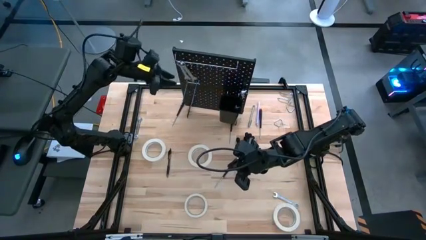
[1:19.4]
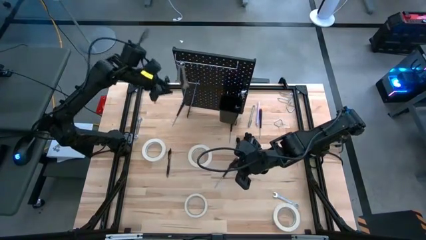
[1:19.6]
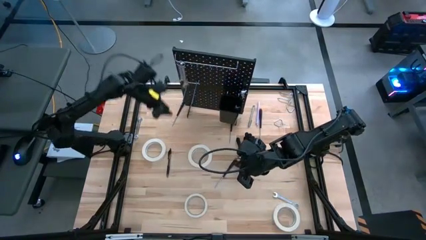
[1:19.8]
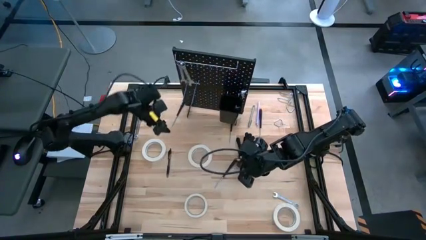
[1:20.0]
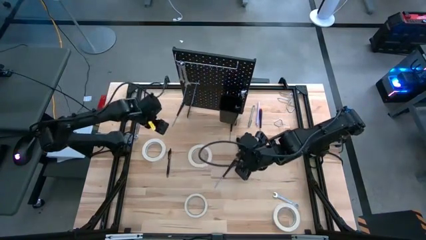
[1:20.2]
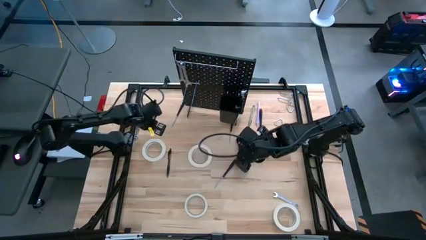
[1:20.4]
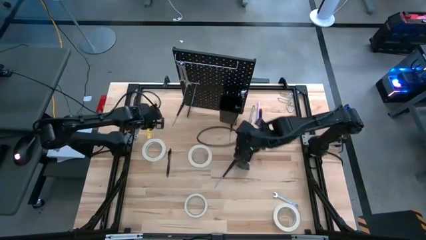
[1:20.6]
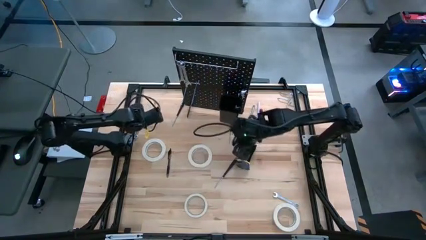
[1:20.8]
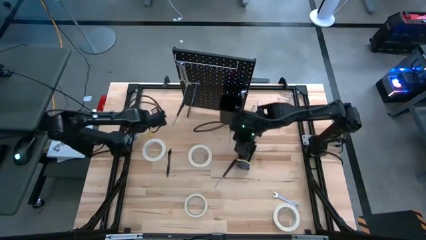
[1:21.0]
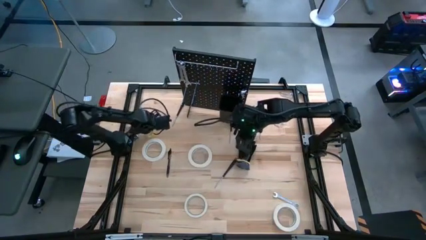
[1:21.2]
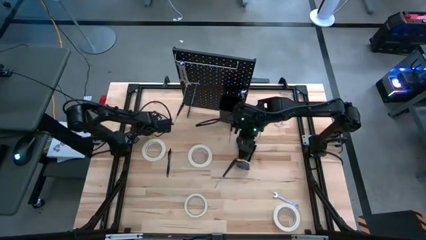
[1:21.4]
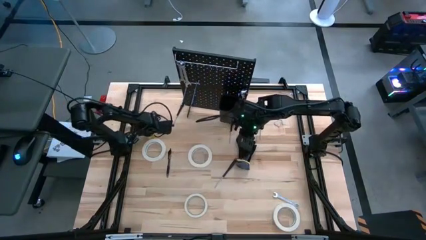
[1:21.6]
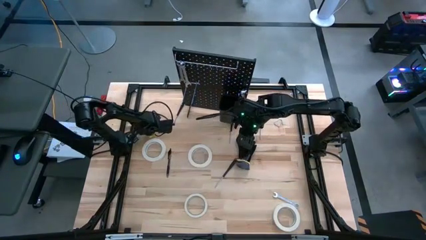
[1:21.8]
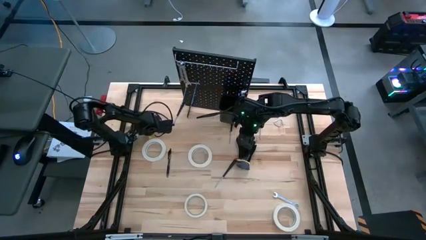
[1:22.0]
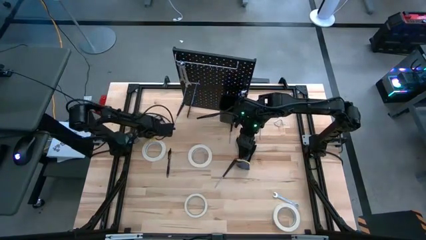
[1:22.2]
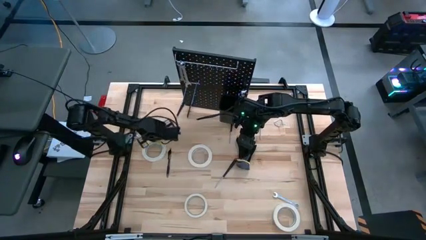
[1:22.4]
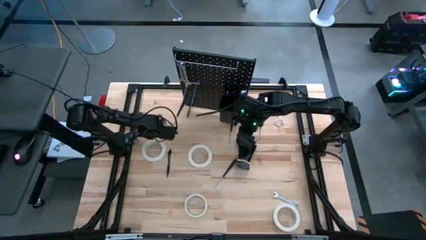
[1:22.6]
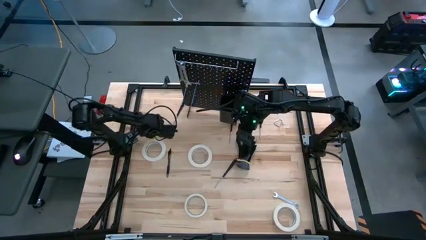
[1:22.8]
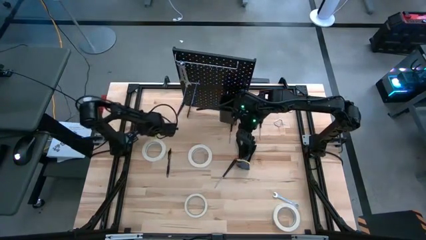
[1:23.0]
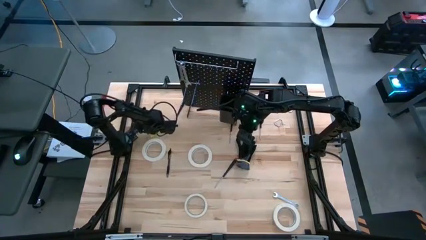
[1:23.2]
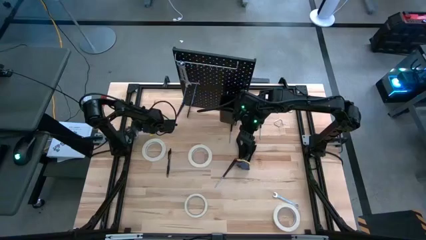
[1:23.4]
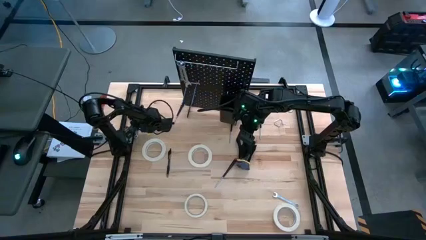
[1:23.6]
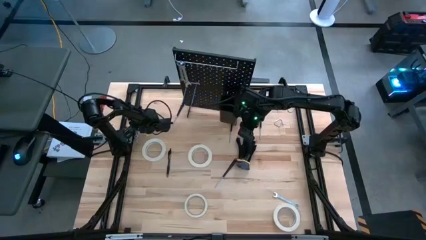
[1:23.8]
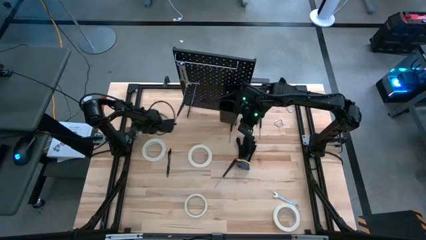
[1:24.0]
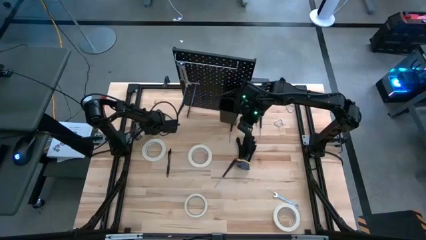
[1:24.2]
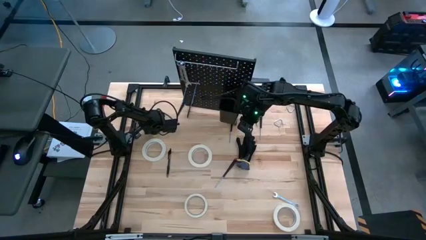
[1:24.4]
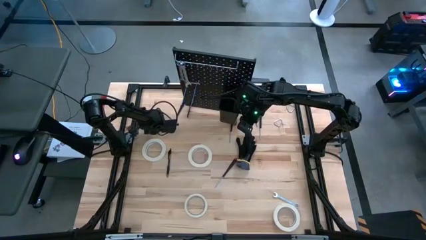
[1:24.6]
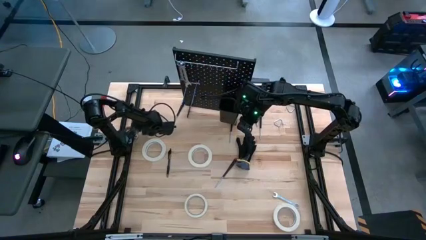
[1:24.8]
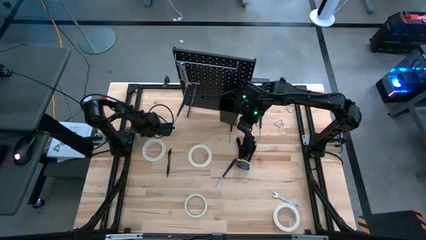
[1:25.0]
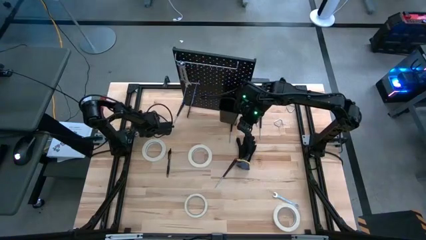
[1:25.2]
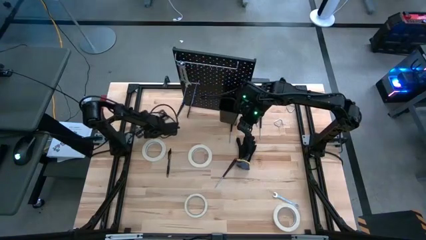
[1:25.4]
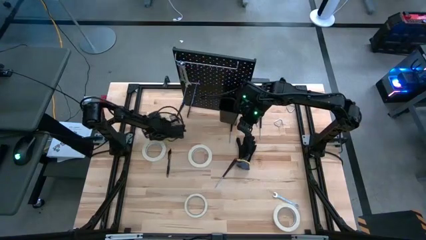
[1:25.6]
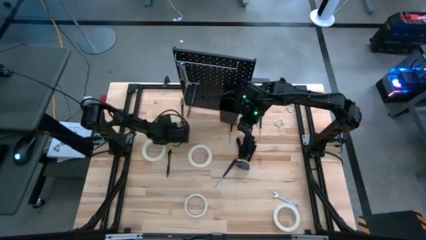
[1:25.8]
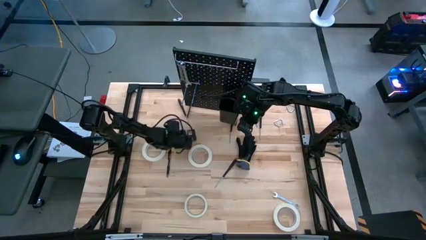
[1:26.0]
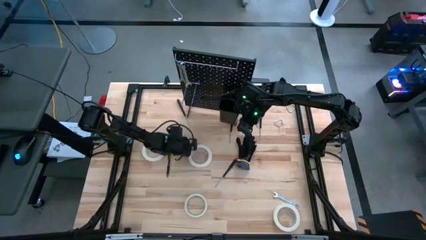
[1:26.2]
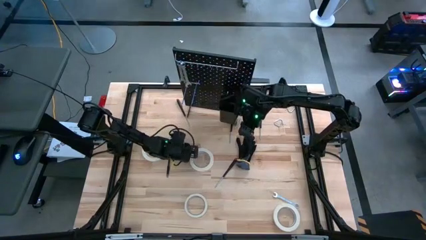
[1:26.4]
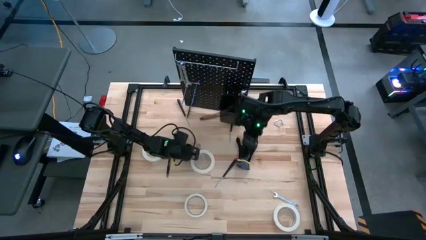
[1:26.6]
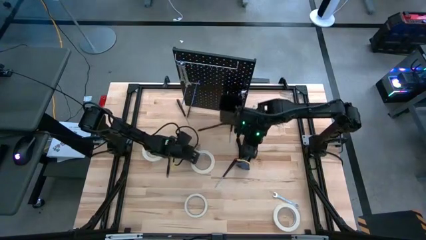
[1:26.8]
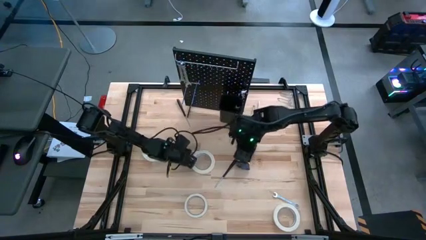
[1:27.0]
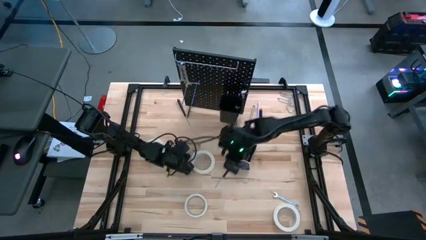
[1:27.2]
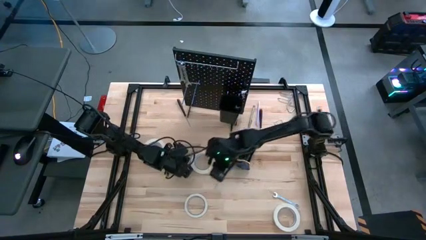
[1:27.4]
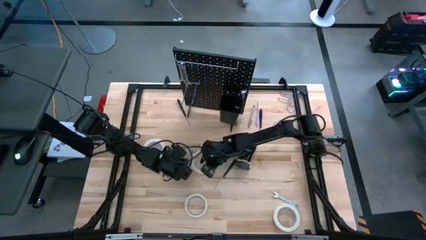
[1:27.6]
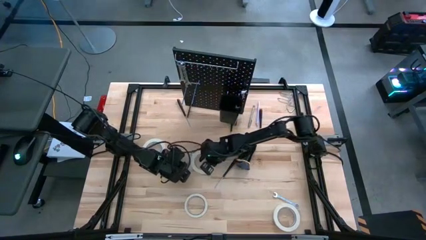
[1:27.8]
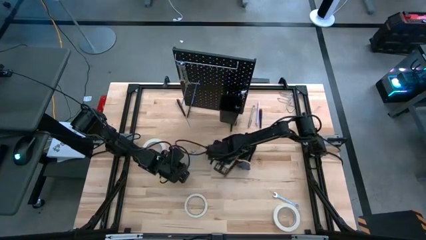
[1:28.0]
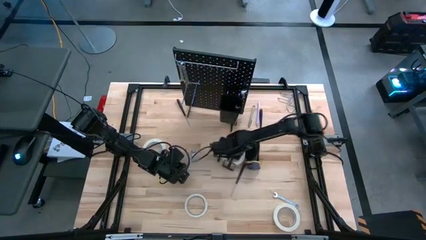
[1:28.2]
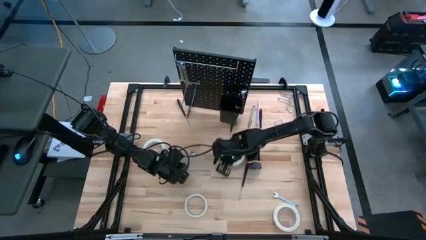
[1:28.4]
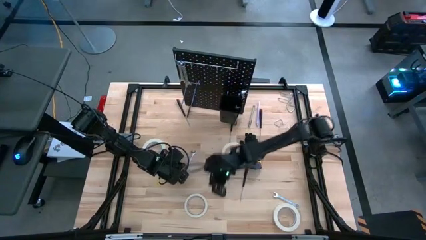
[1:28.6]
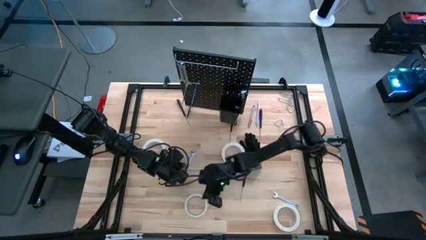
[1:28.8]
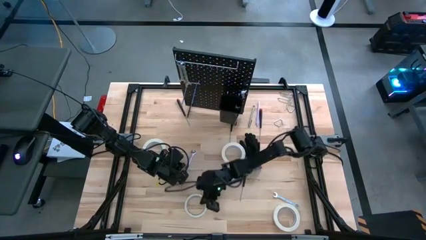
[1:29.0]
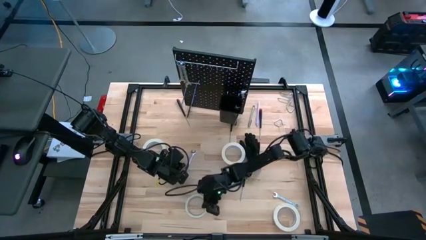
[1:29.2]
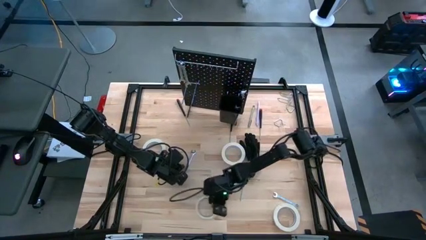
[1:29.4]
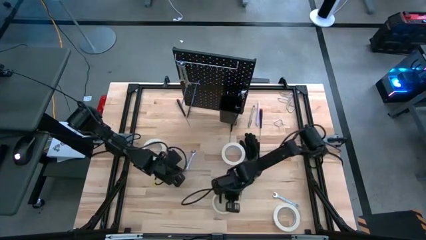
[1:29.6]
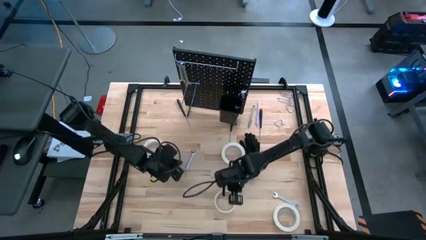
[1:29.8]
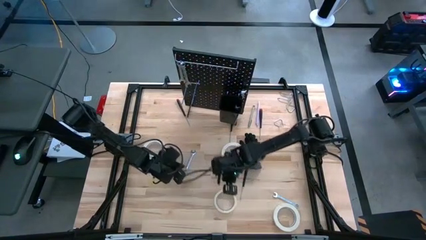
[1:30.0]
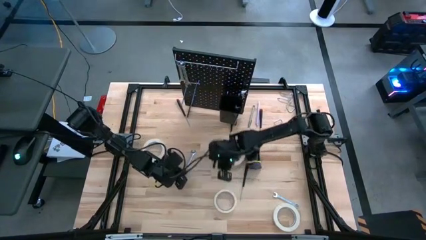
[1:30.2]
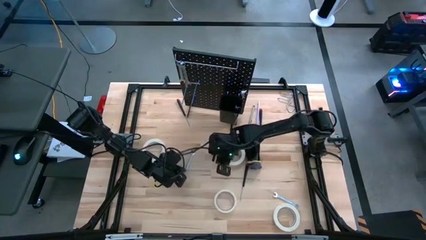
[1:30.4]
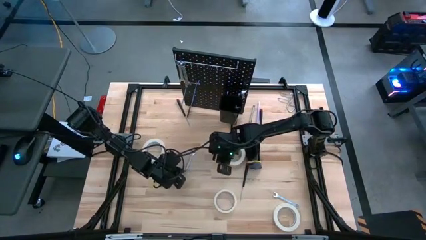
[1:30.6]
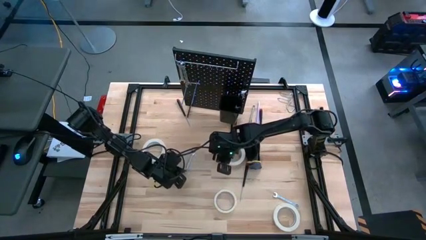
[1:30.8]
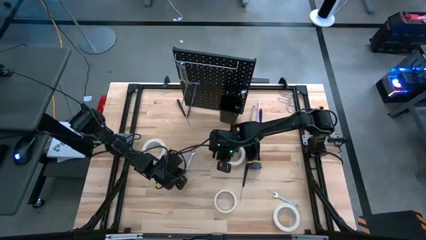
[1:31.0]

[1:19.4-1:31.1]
Task: Hang tools onto peg board
Hang the 12 mm tool onto the pegboard aligned with the others
